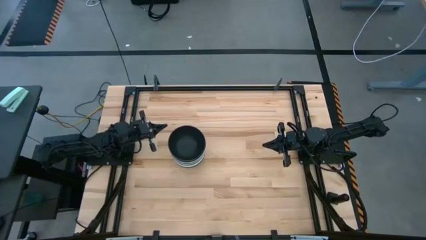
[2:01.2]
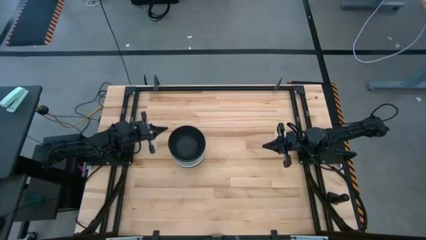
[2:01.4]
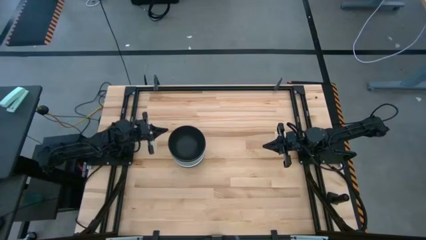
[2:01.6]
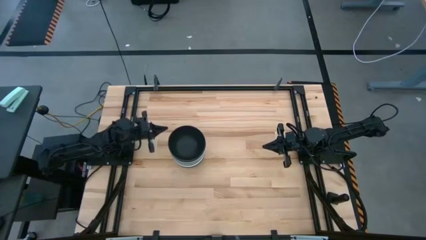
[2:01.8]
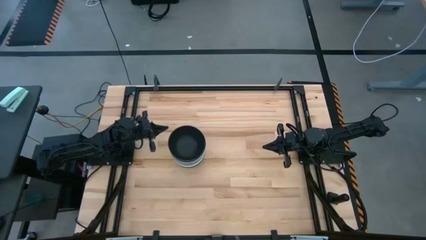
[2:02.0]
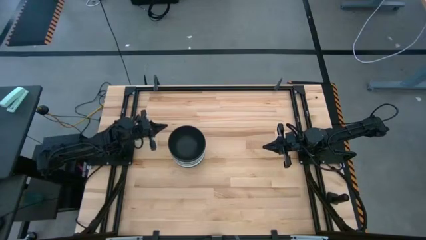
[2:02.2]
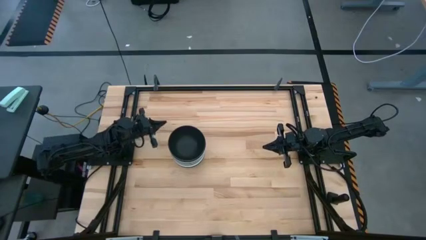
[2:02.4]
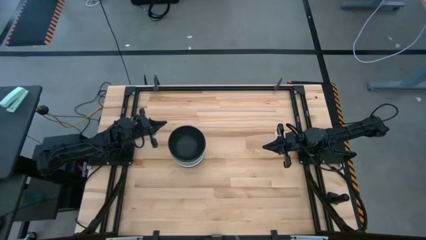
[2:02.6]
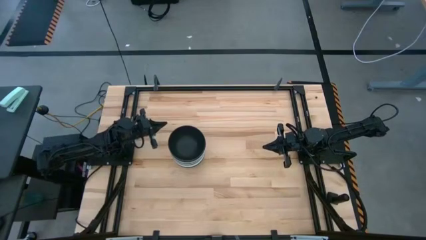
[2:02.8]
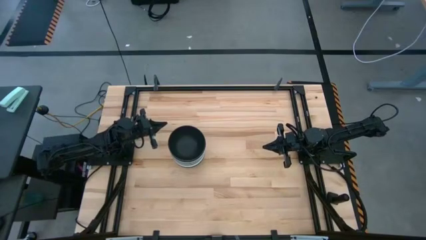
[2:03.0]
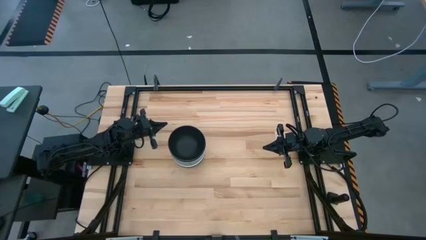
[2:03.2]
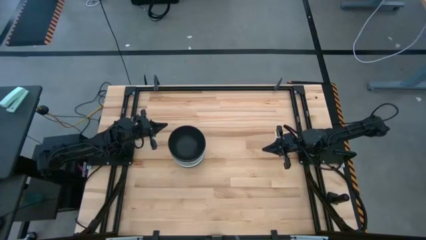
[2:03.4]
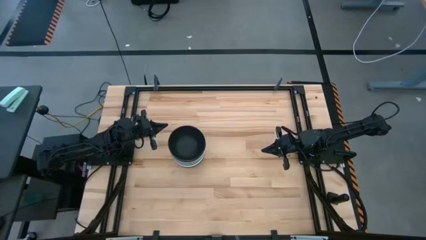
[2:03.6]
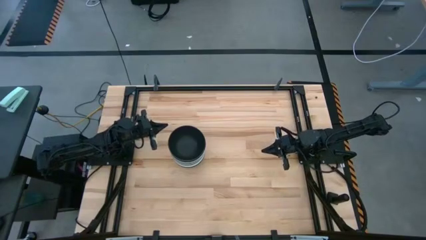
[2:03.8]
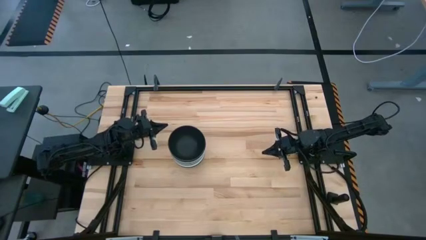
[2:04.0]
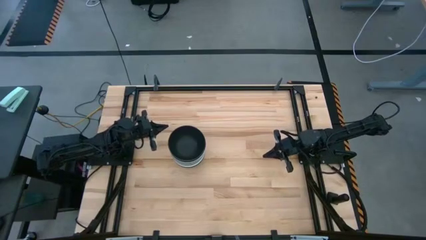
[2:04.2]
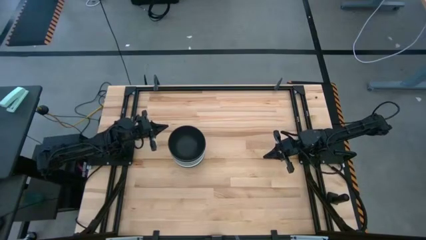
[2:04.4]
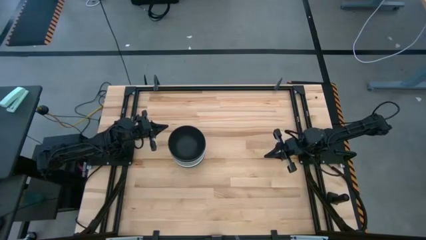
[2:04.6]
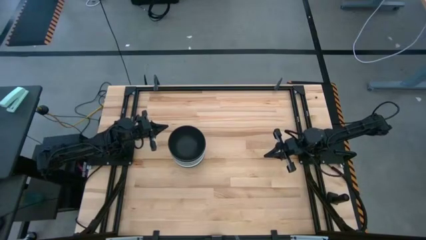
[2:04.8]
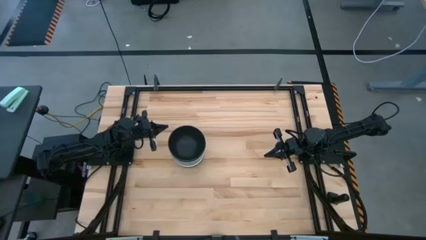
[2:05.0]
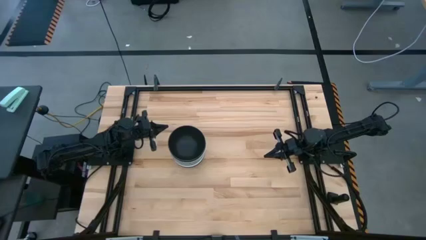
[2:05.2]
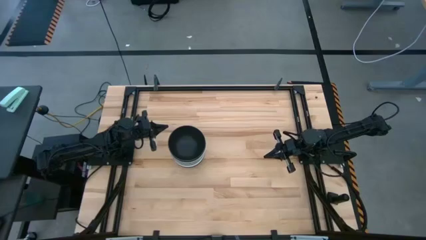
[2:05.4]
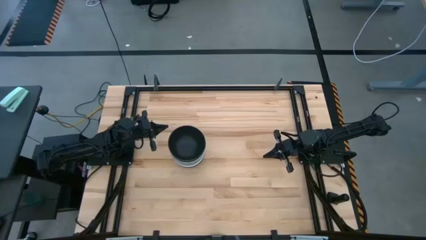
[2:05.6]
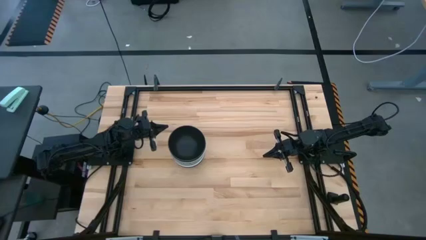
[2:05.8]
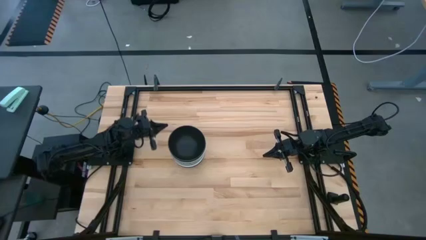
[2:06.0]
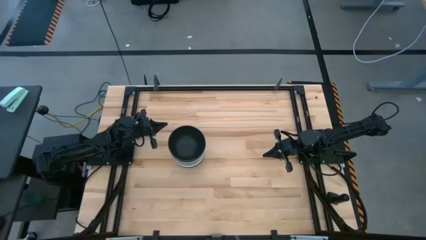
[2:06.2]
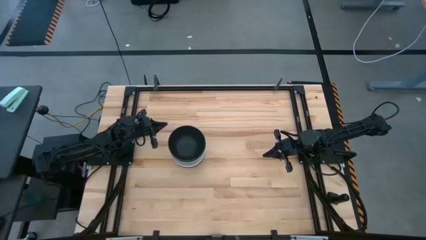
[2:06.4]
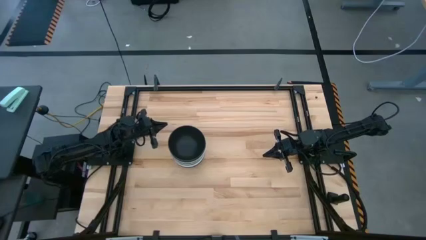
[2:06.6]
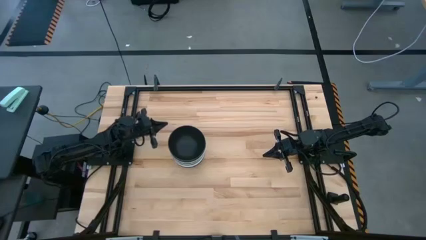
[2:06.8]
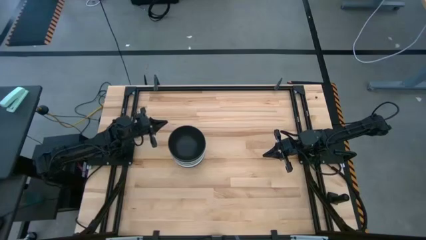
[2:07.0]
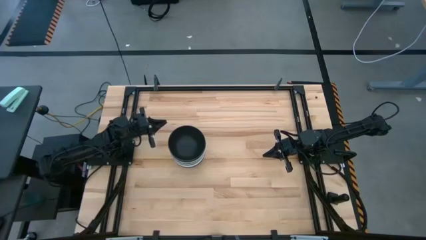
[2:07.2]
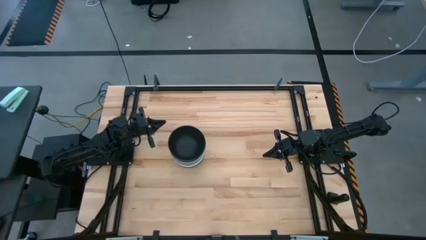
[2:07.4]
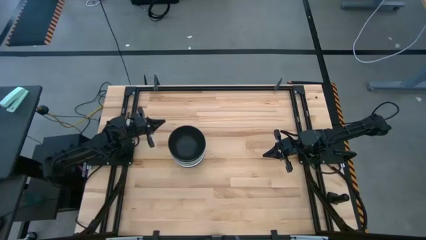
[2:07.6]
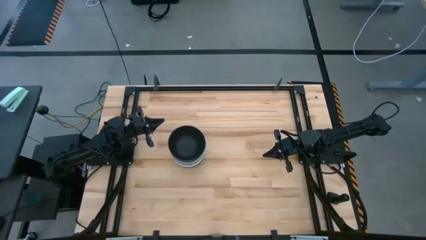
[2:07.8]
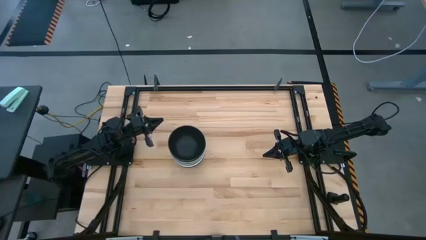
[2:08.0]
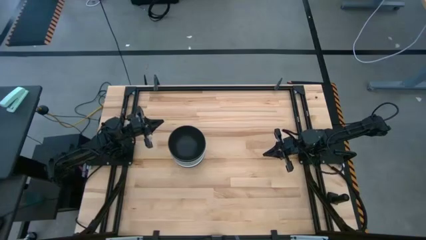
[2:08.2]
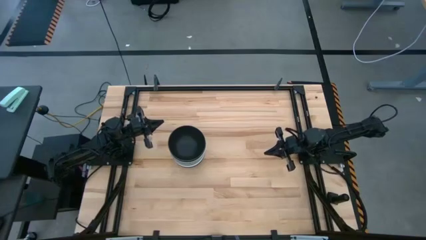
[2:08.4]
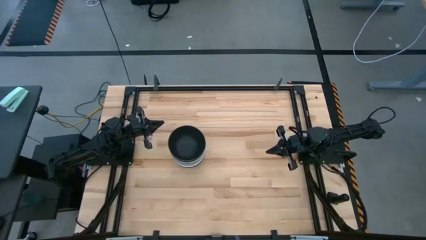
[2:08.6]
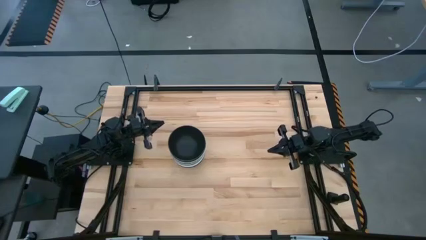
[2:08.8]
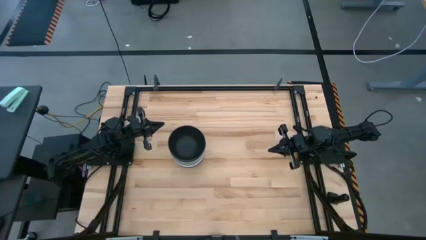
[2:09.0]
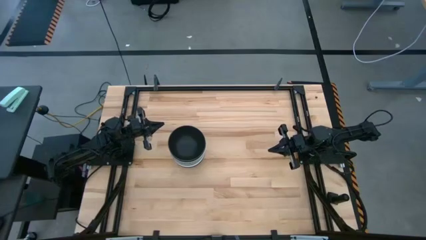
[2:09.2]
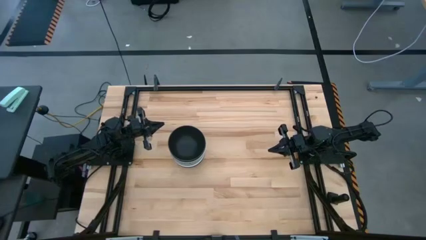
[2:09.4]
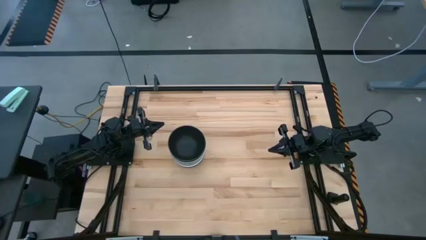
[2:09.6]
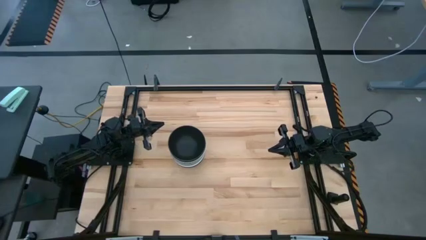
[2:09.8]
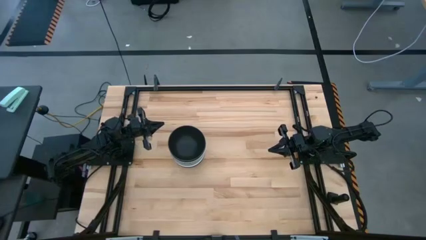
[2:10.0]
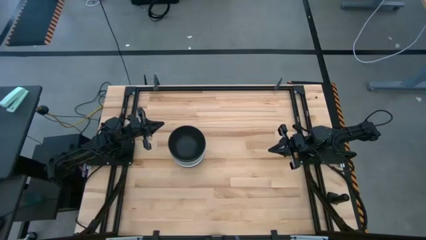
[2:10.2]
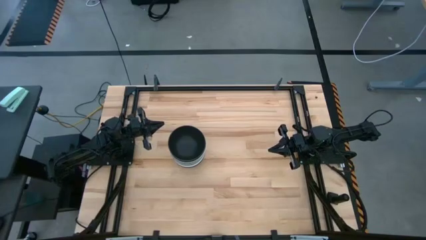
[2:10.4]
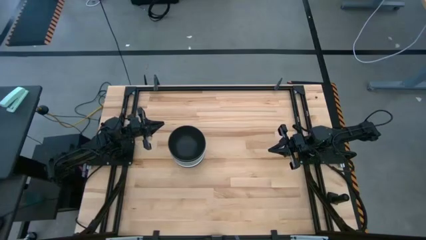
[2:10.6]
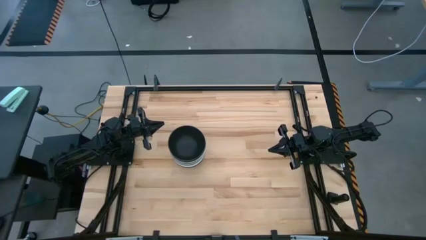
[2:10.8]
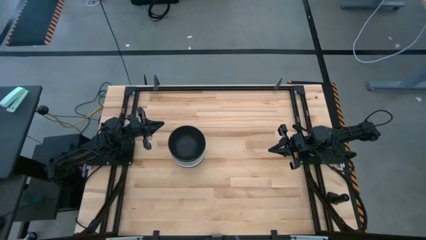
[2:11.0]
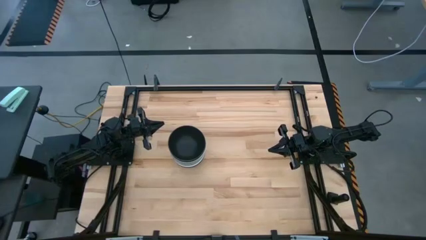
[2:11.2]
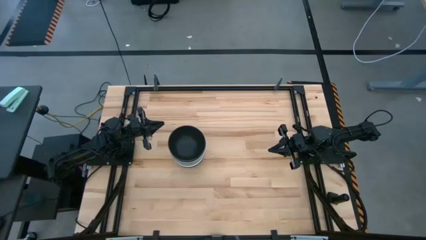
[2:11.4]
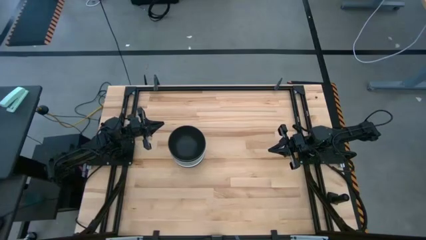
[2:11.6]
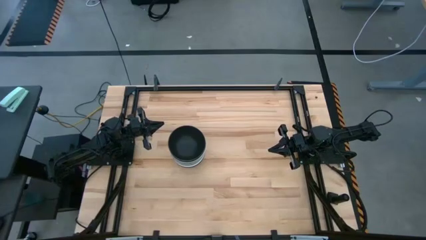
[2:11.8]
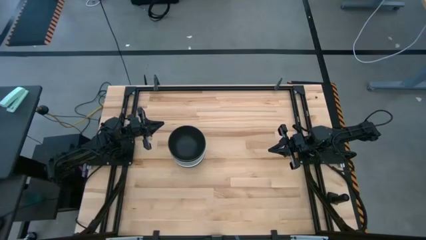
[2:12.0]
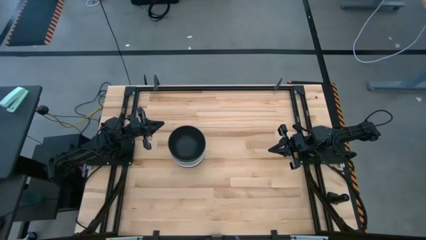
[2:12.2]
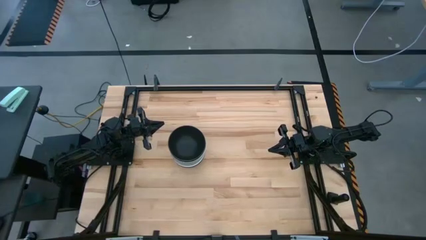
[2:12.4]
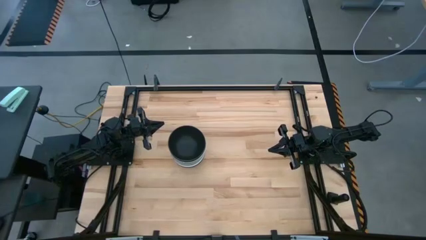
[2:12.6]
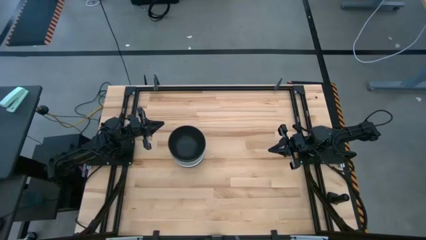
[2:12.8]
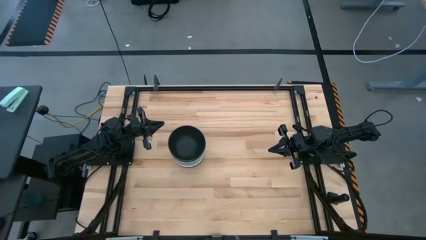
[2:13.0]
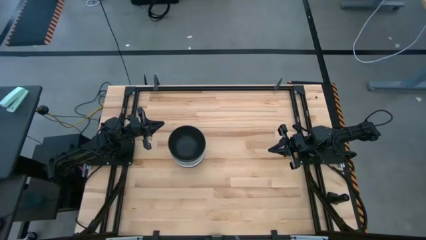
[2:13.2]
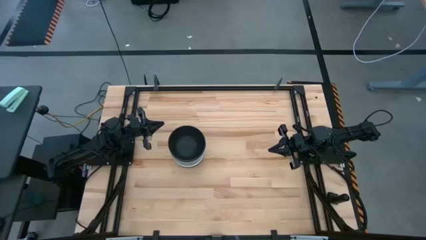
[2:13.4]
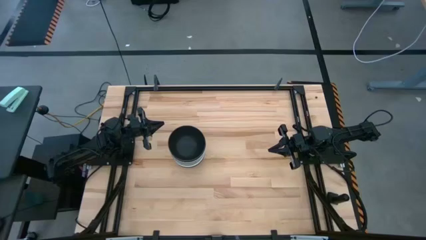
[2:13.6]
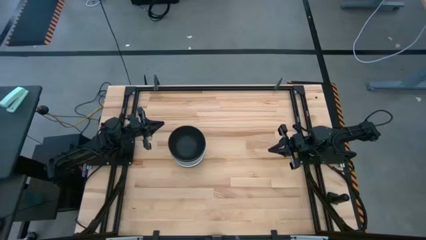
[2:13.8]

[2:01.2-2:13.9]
Task: Nest bowls inside each other
Return to Home Position

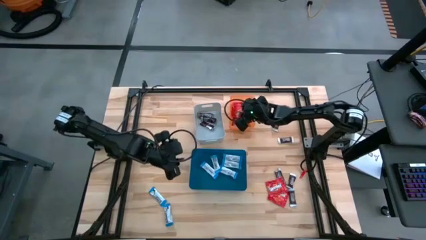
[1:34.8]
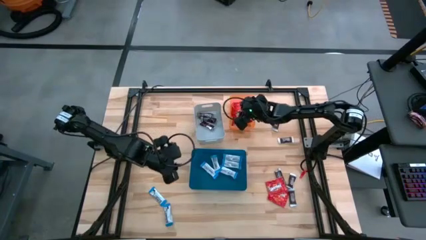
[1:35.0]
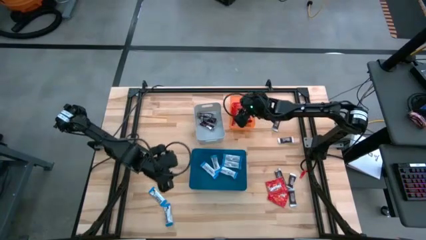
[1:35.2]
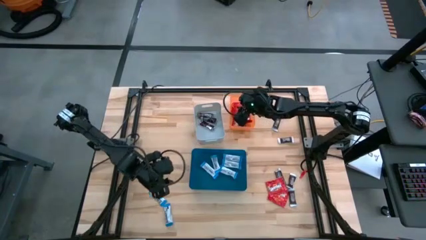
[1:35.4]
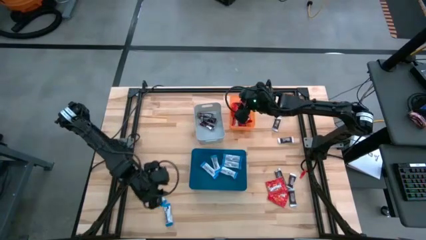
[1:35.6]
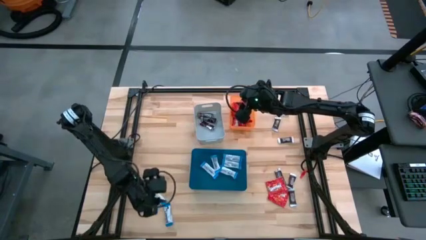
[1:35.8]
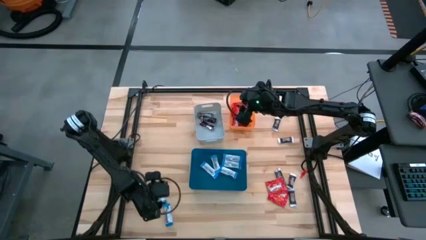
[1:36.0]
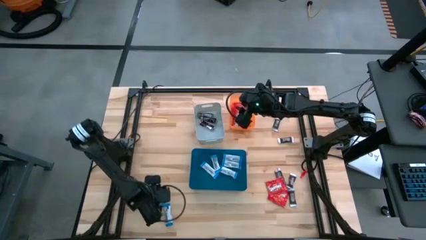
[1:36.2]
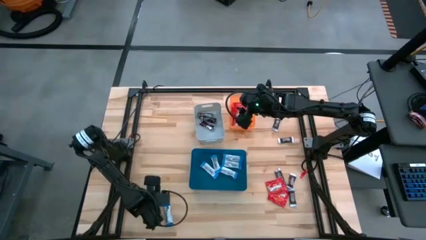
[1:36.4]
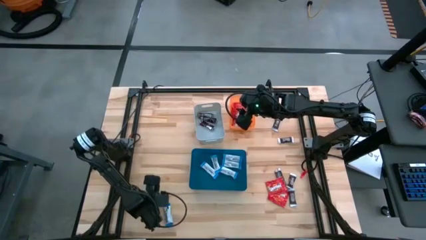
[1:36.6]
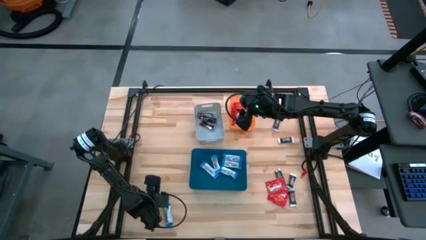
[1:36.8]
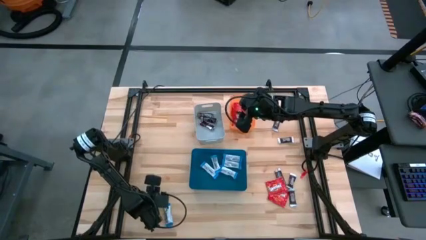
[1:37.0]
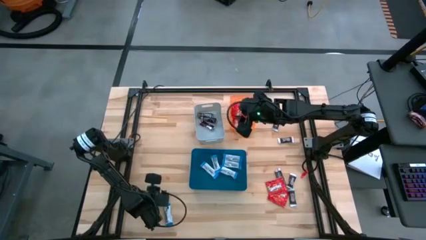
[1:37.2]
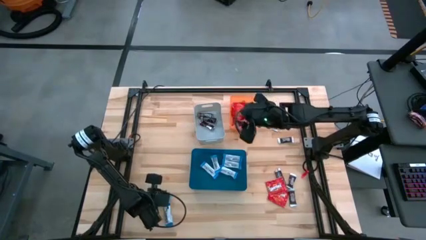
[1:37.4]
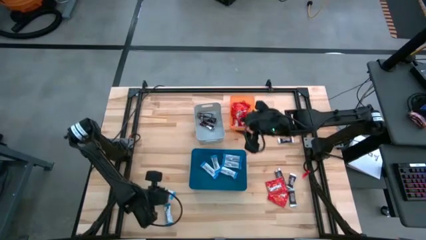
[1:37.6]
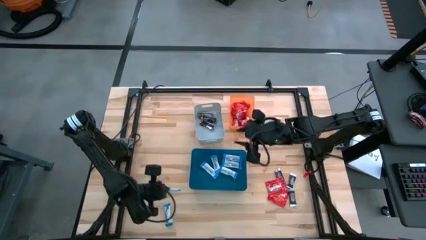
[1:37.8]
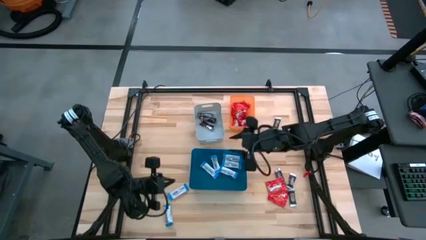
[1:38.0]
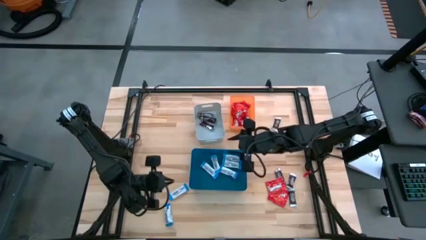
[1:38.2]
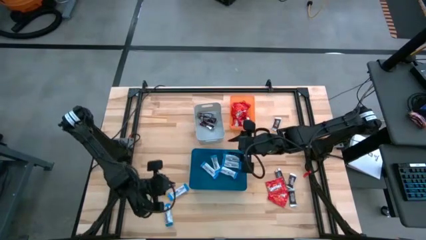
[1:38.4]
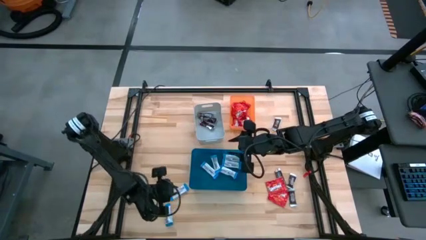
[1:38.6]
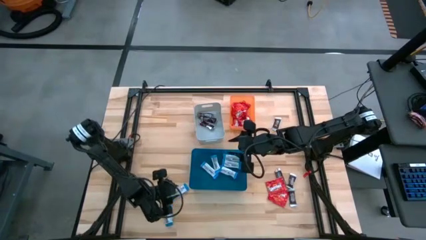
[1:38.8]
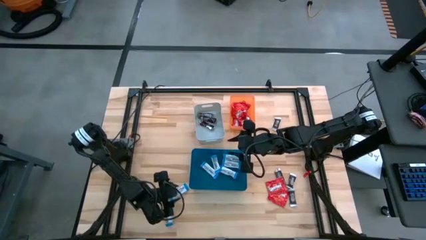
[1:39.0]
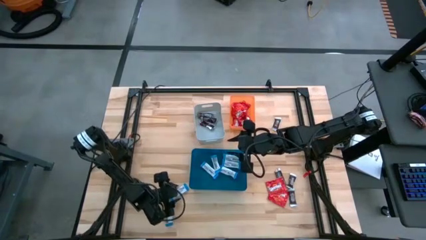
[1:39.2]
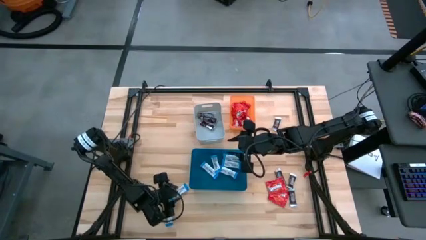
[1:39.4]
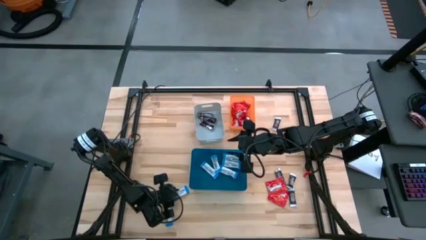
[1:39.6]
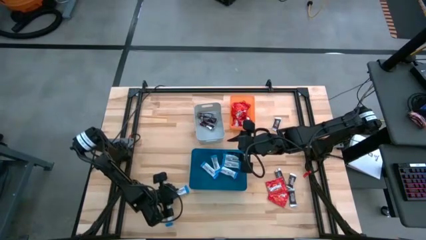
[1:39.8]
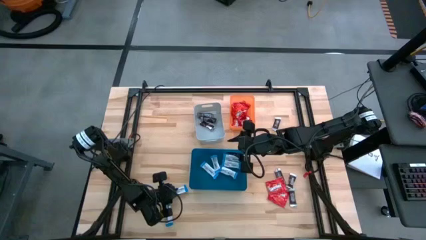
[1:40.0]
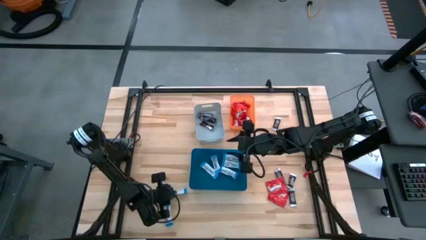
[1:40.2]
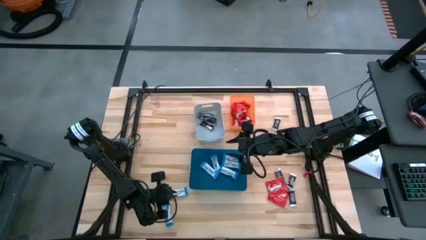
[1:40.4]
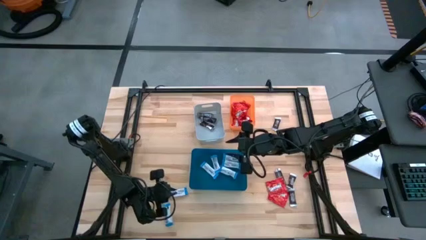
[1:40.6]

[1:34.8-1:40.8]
Task: Sort candy
Put the white chocolate bar into the blue bin
